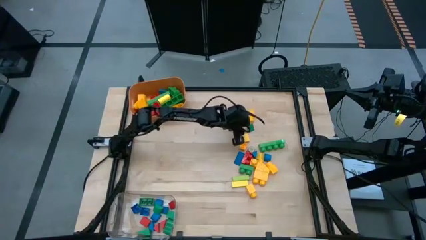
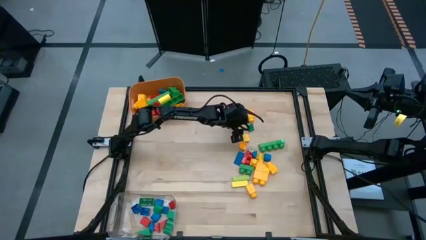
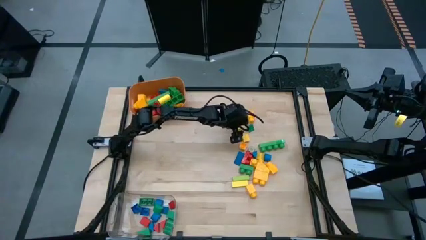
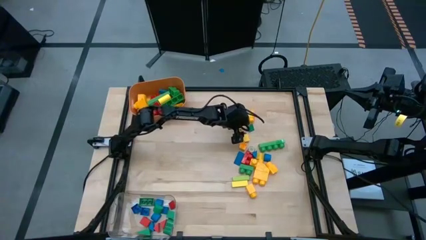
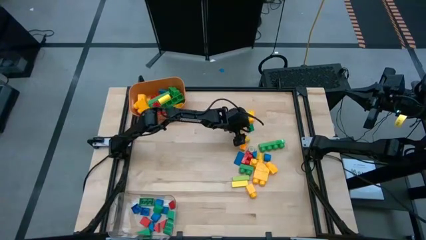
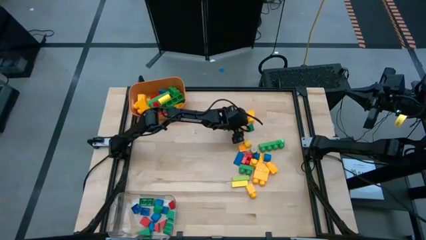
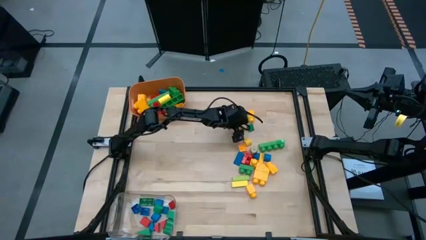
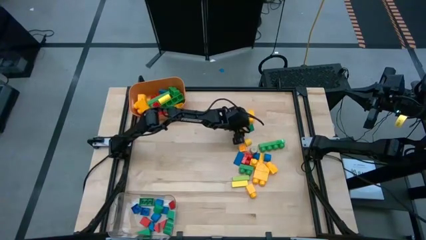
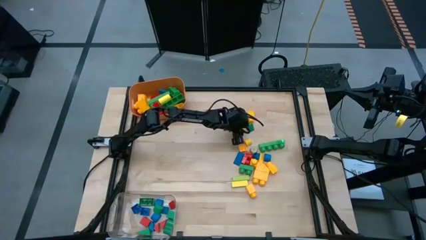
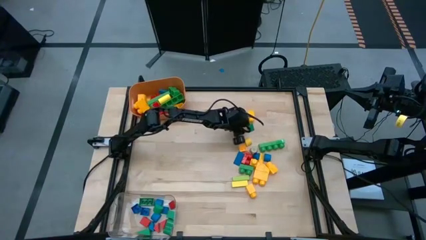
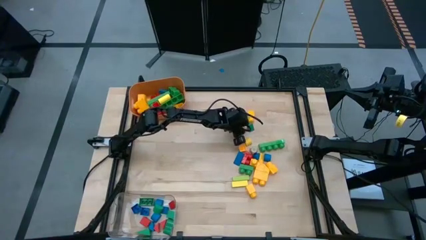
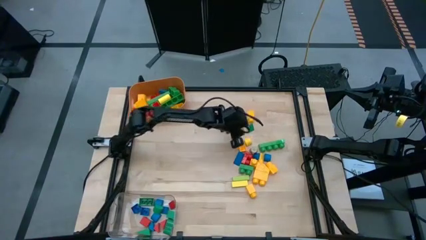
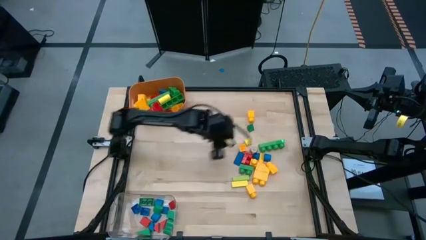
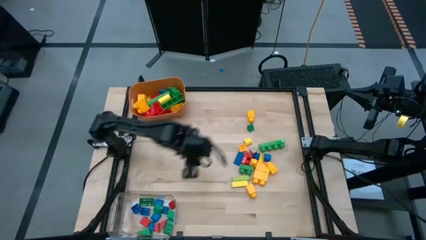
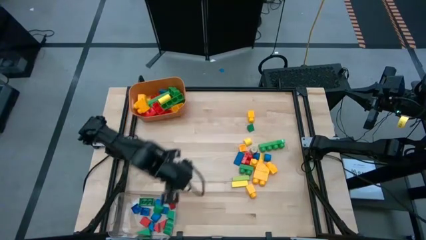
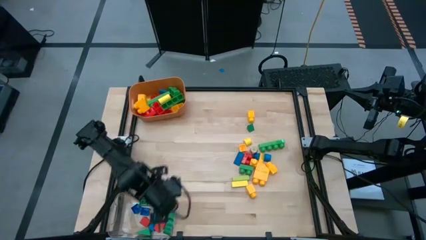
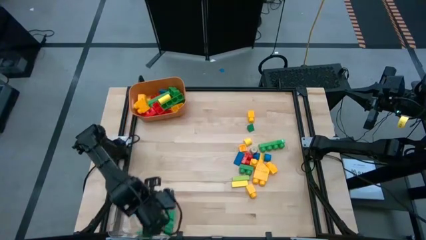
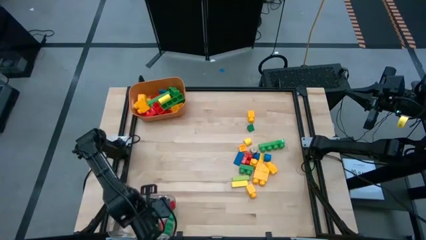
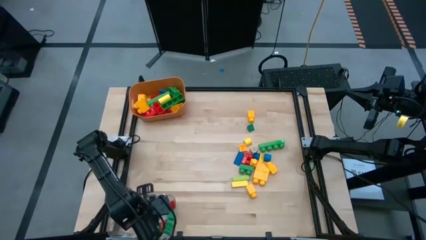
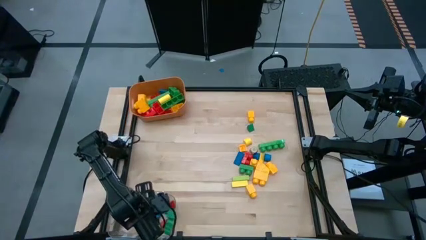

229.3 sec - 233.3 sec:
Task: Sort blocks by size
Put the small yellow block into the transparent bin

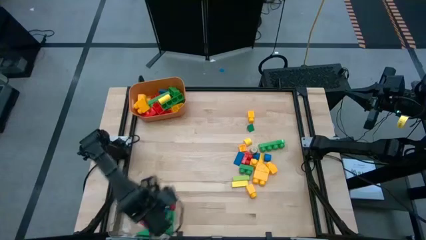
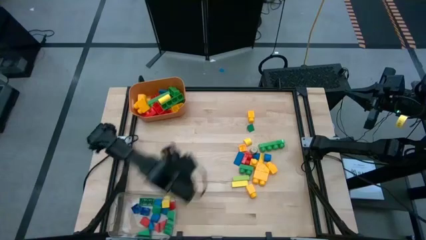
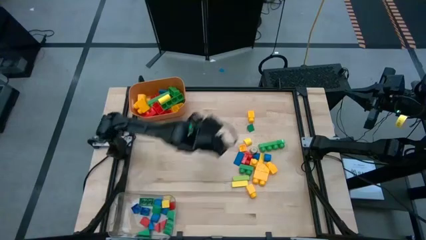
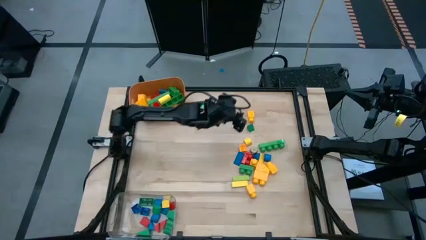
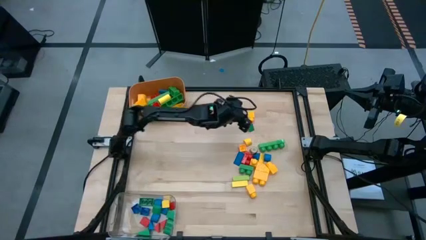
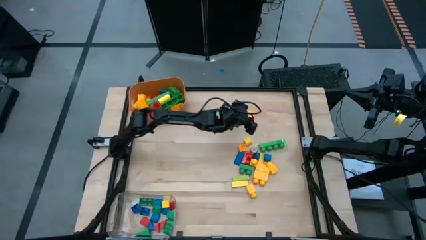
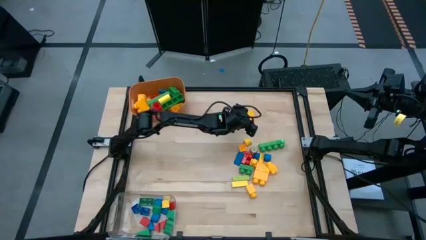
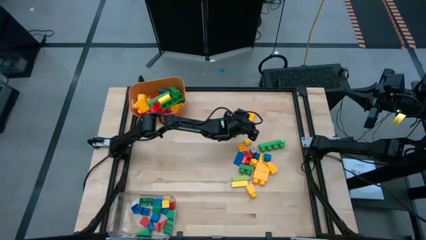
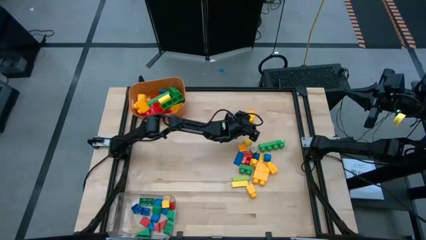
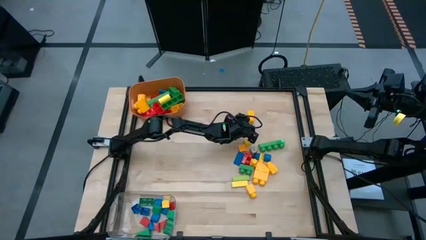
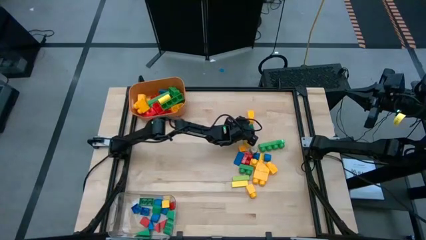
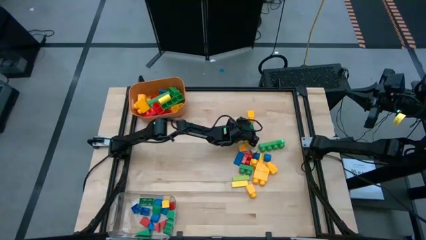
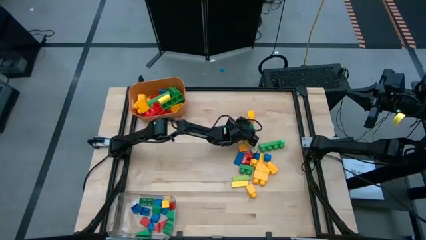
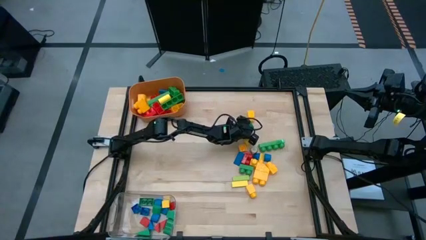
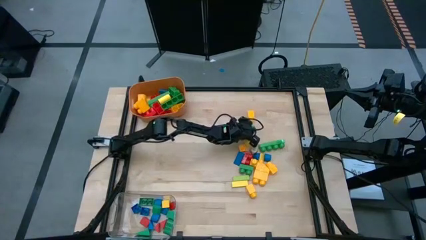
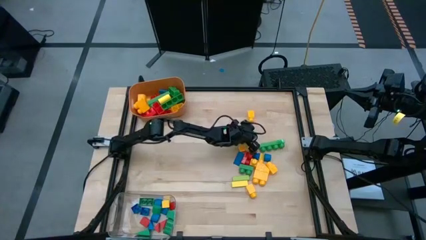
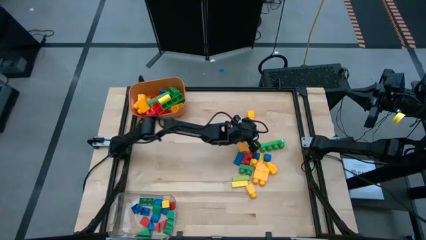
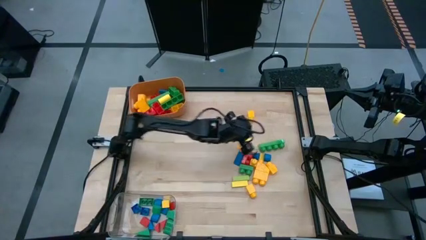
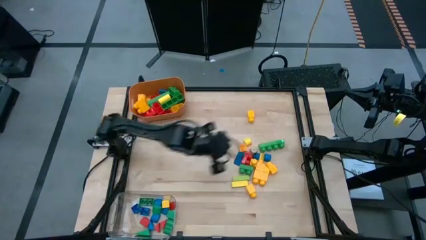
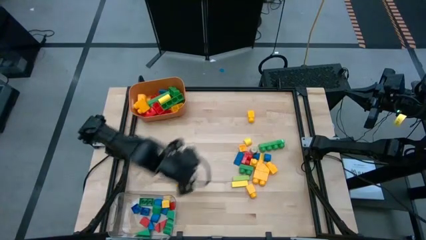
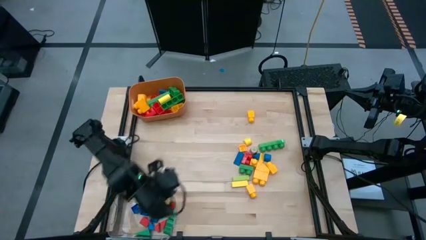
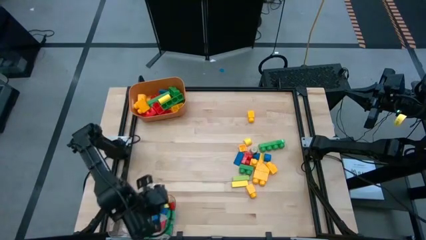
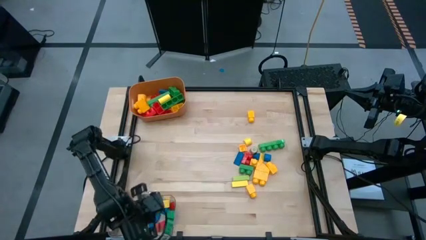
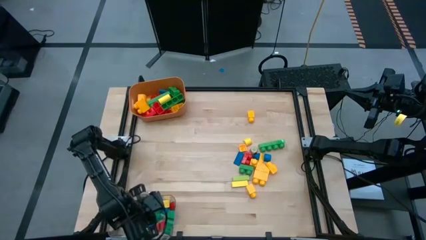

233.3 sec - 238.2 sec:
Put the small green block into the transparent bin

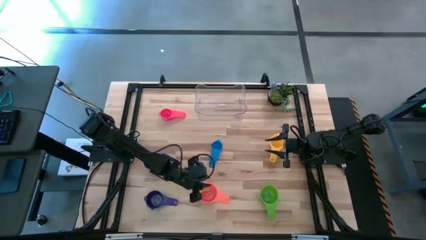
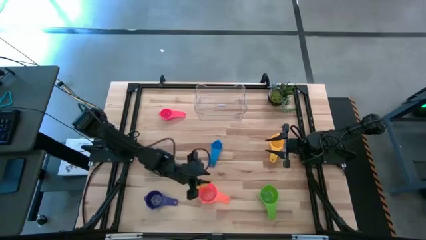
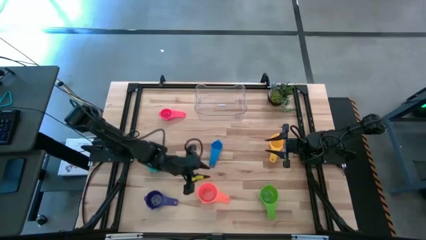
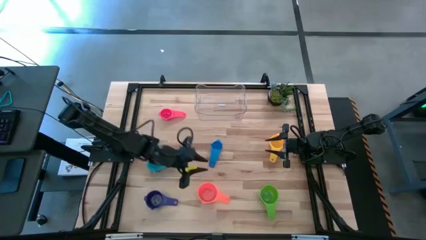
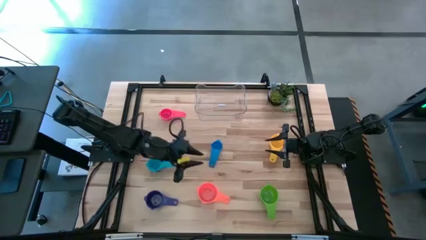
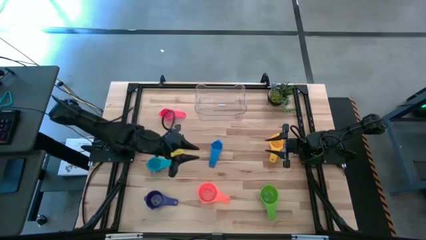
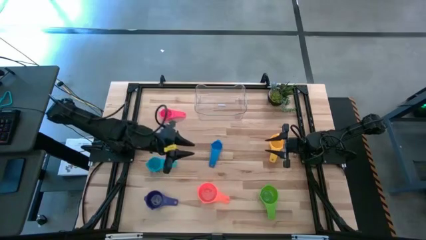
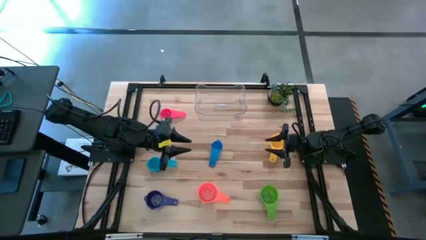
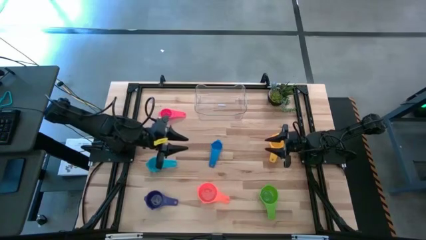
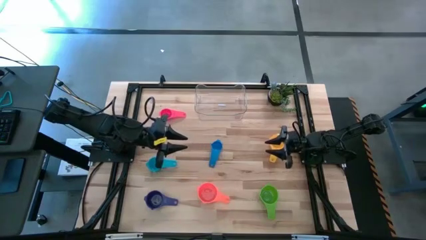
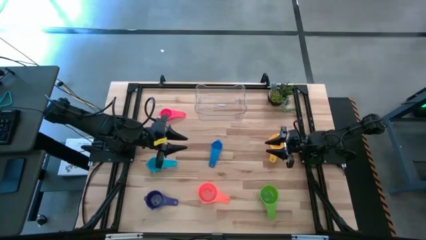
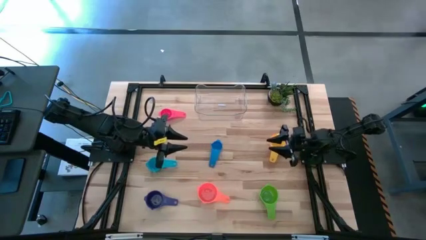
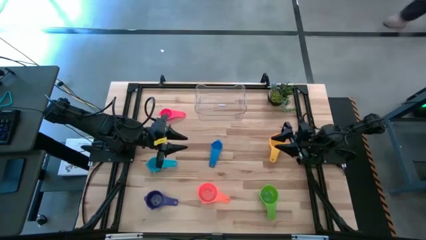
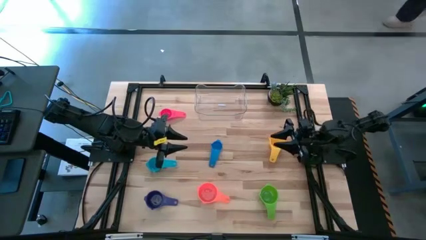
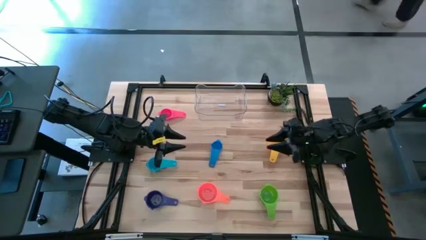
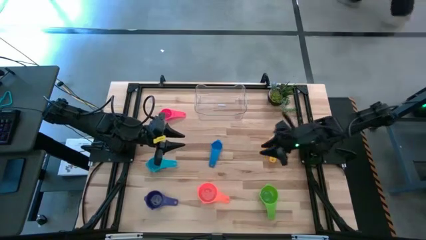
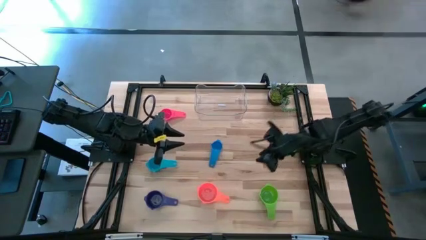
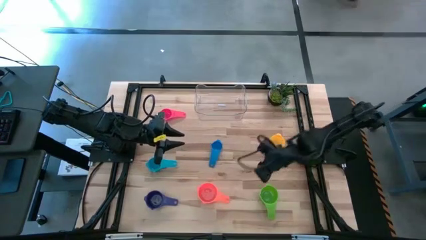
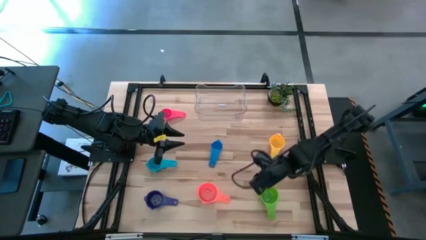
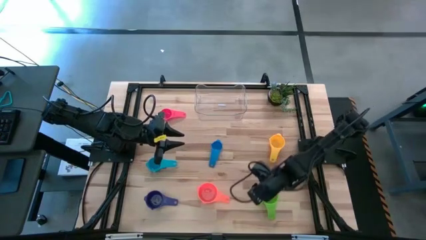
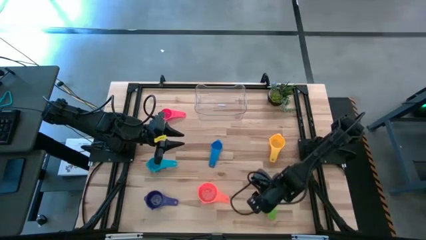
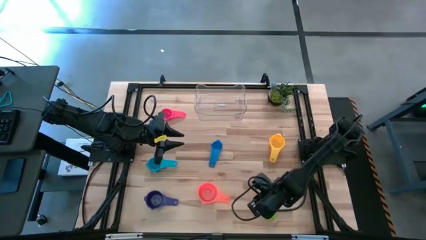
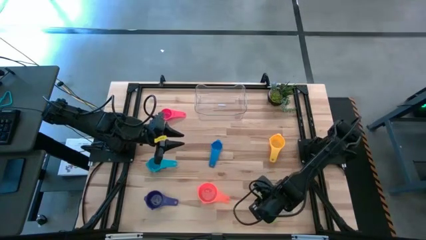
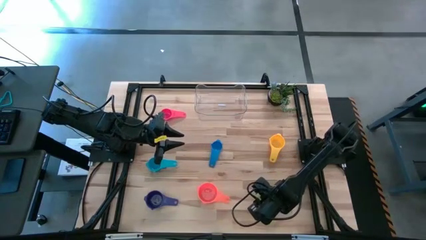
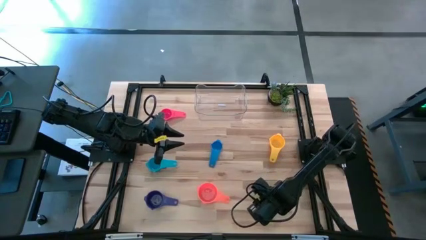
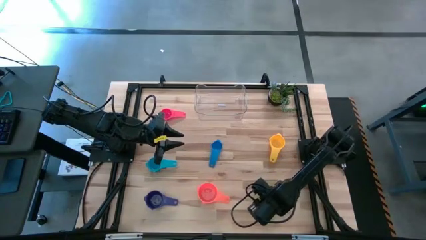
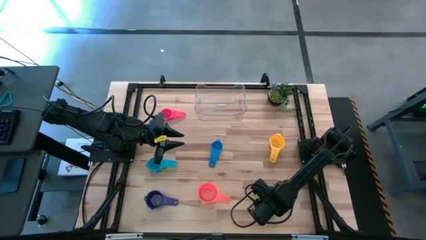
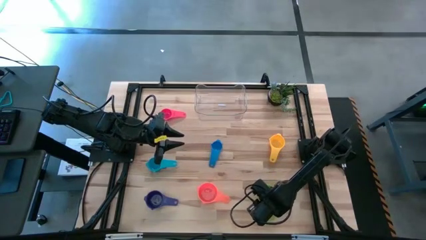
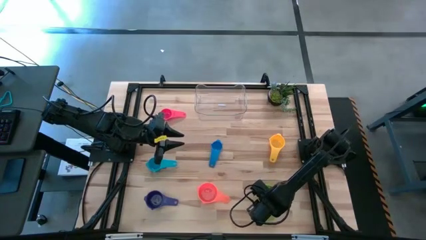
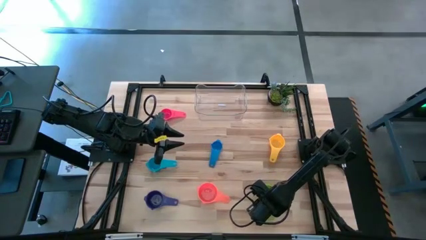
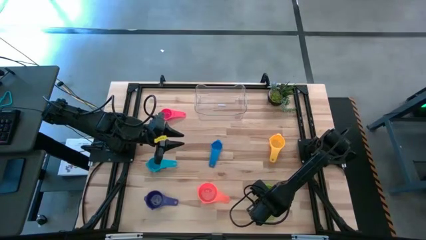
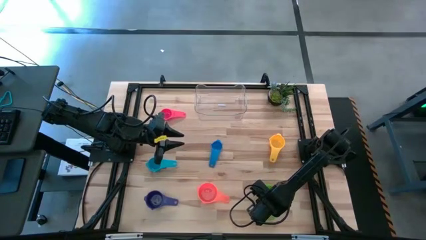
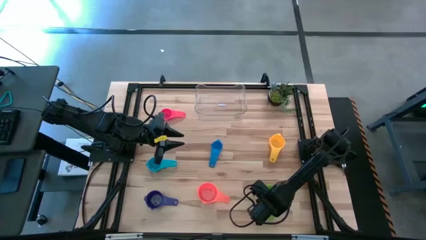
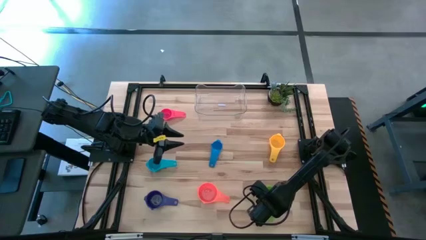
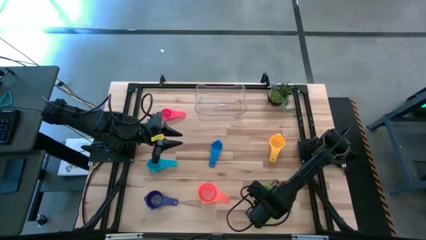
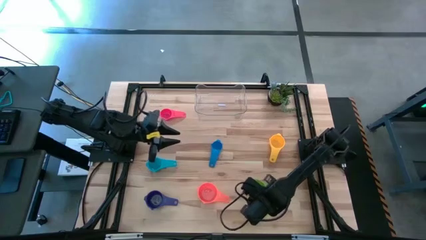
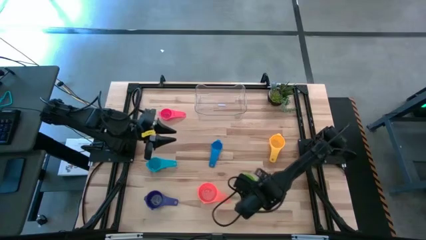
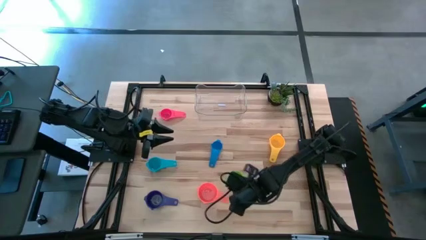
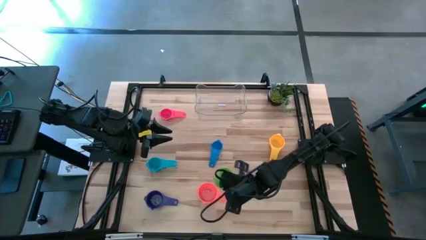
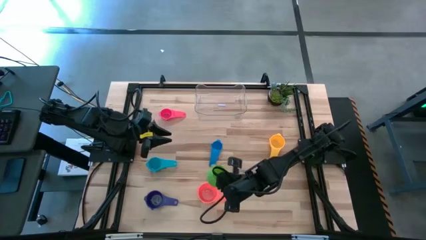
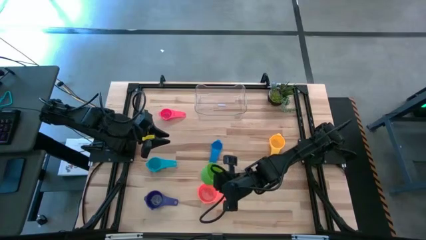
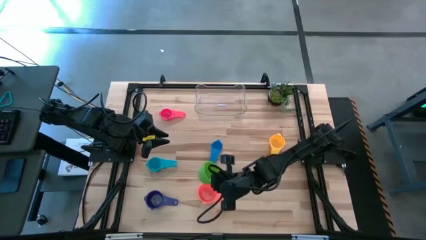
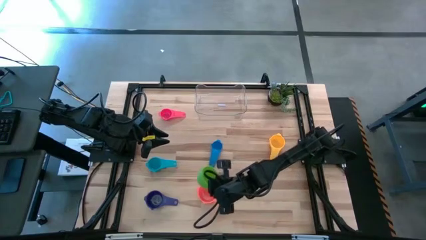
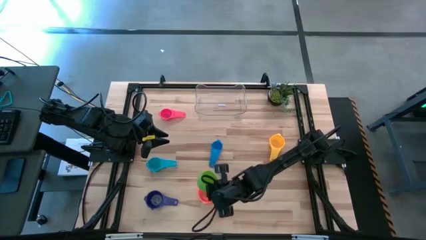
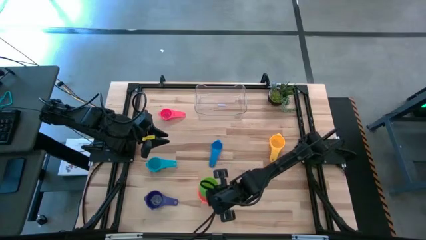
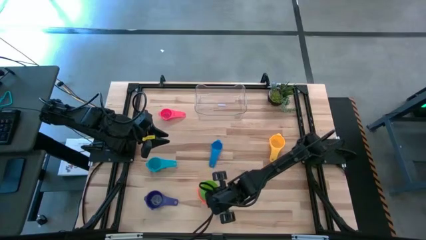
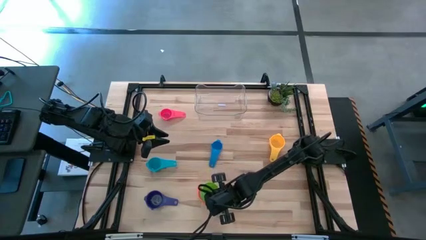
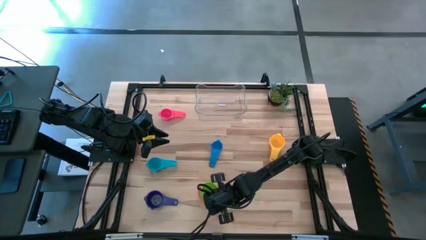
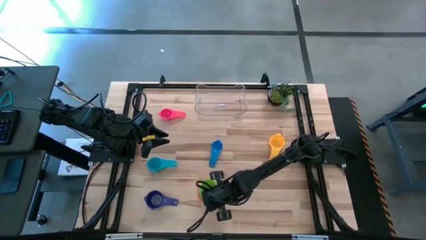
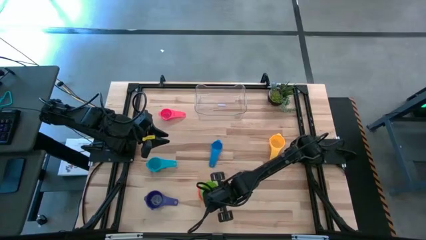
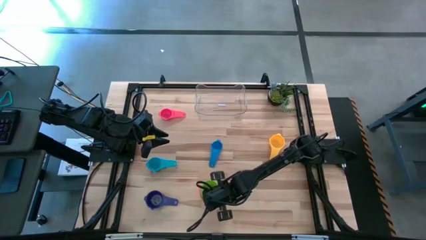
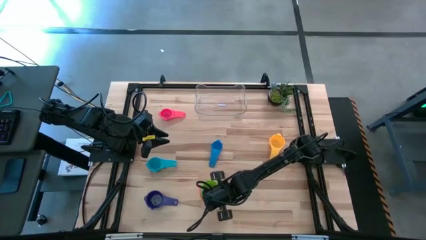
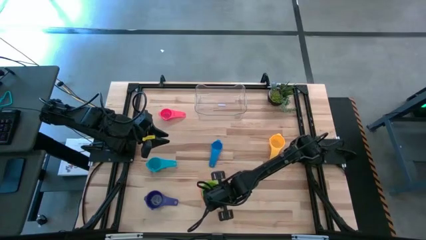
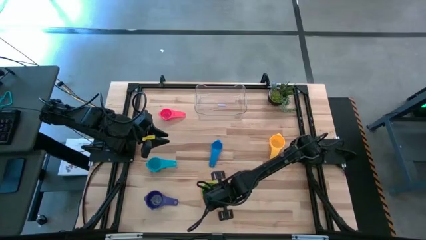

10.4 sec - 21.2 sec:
Task: Nest measuring cups in basket
Stack the green measuring cup in the orange measuring cup
